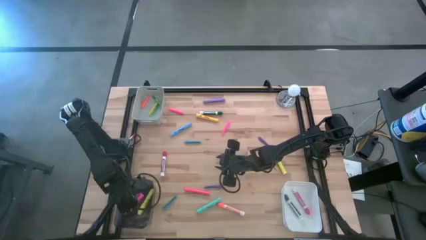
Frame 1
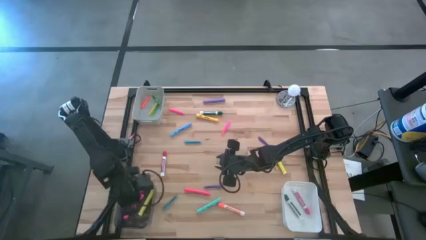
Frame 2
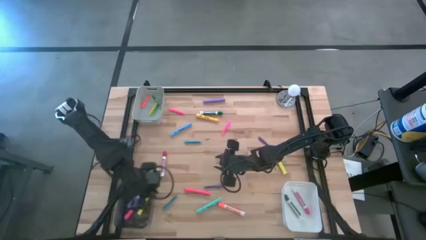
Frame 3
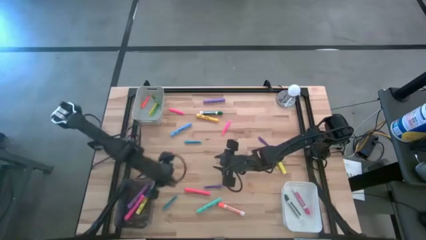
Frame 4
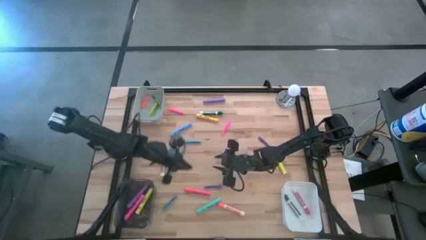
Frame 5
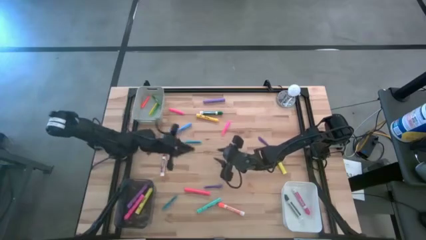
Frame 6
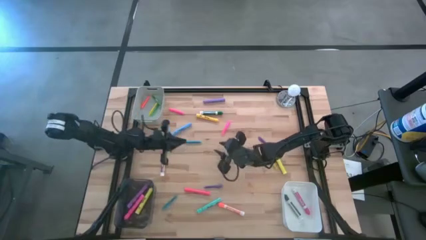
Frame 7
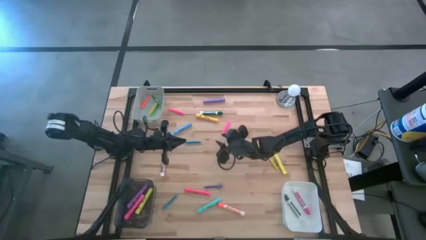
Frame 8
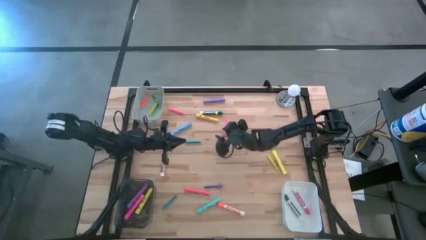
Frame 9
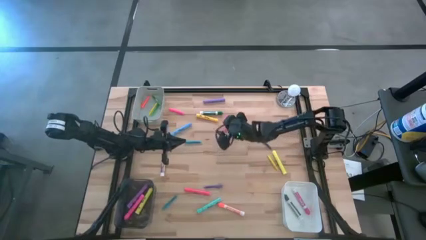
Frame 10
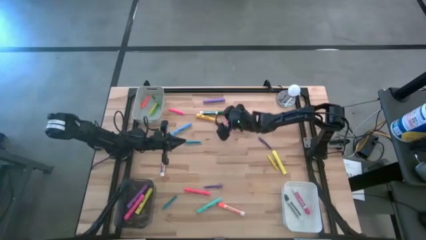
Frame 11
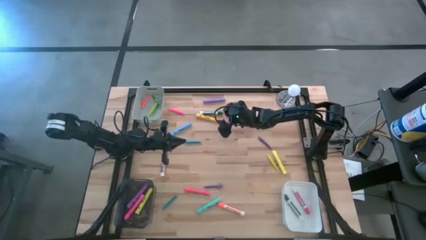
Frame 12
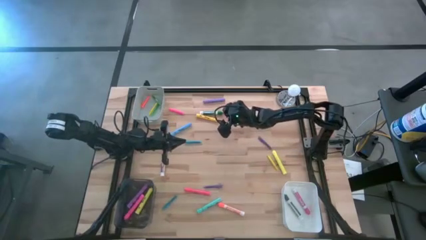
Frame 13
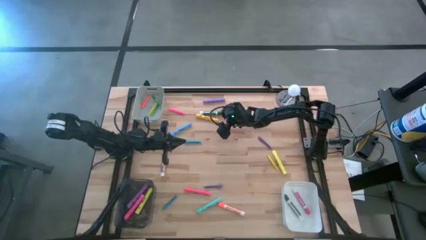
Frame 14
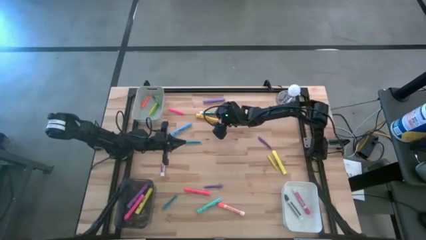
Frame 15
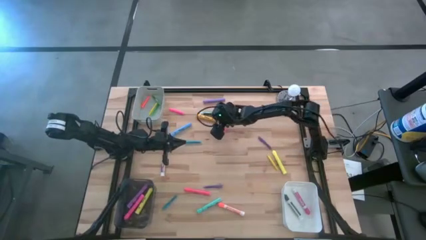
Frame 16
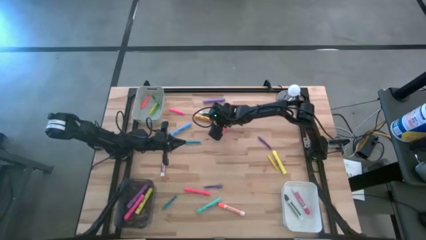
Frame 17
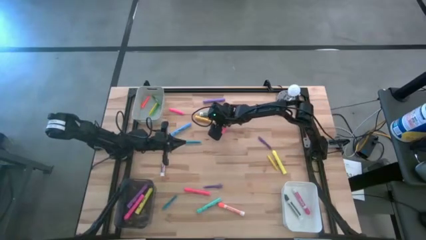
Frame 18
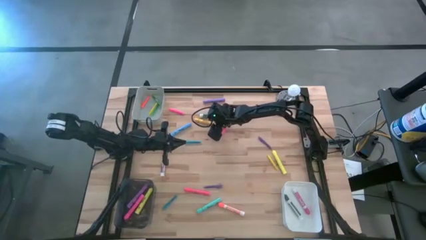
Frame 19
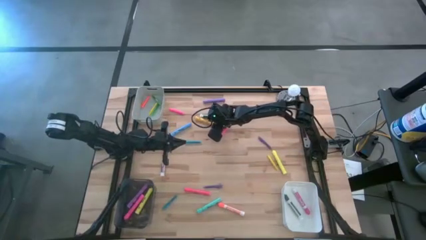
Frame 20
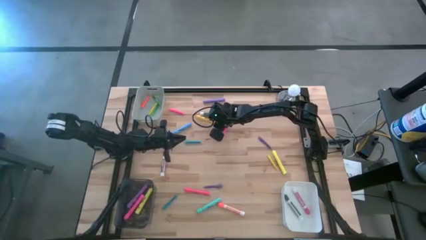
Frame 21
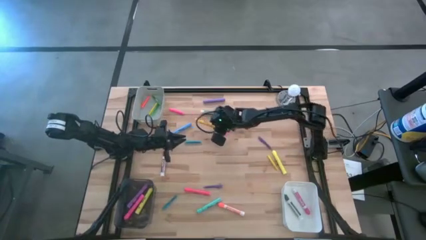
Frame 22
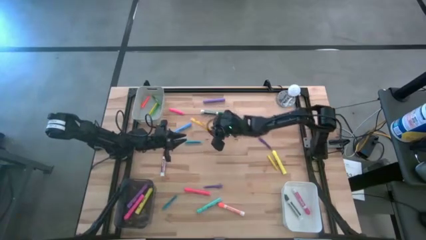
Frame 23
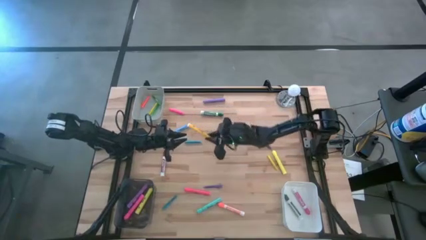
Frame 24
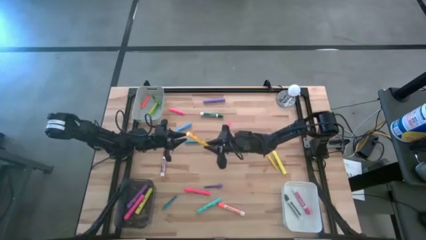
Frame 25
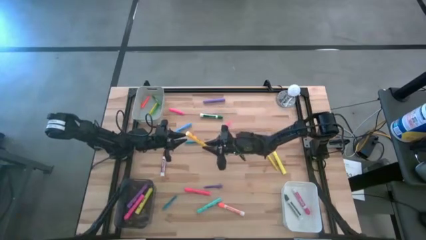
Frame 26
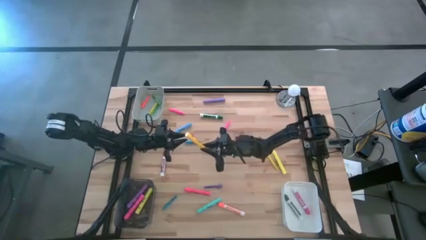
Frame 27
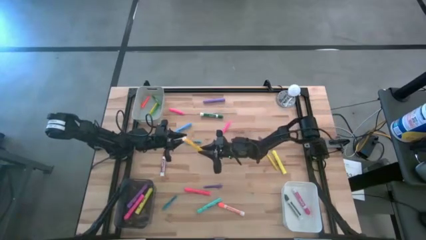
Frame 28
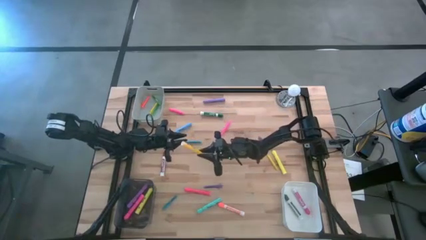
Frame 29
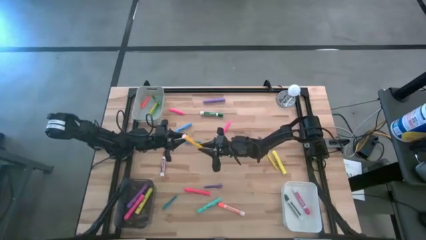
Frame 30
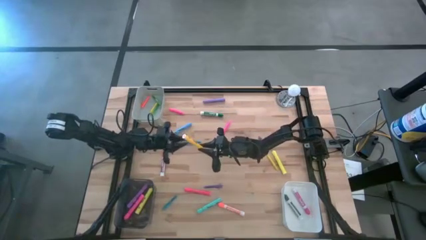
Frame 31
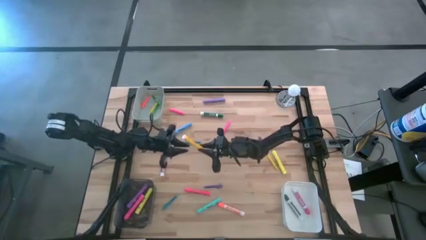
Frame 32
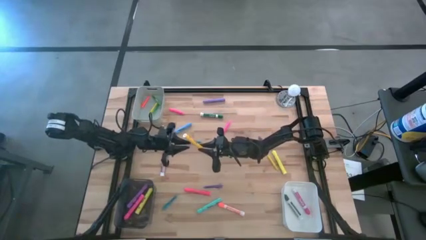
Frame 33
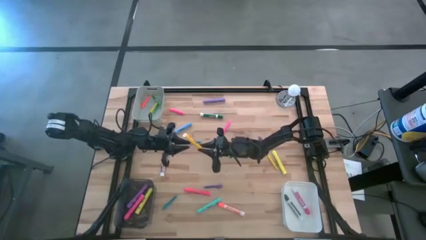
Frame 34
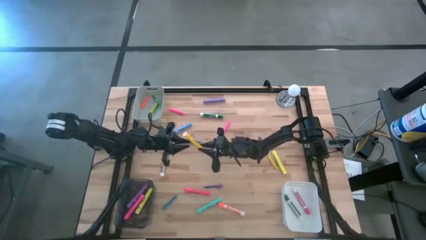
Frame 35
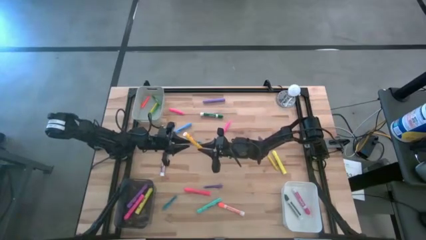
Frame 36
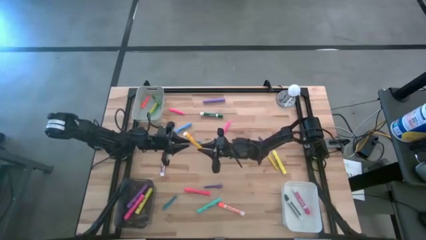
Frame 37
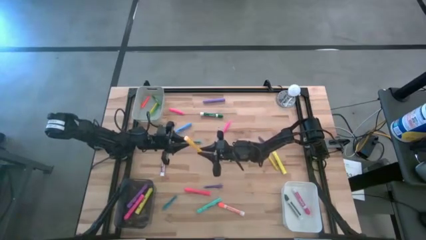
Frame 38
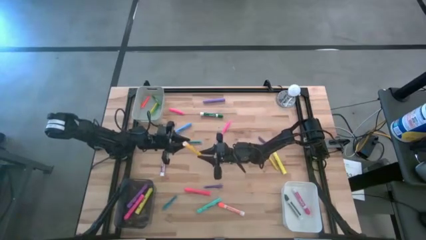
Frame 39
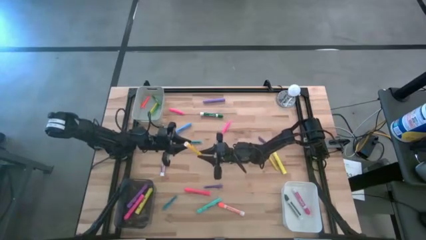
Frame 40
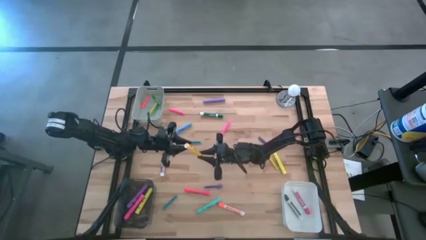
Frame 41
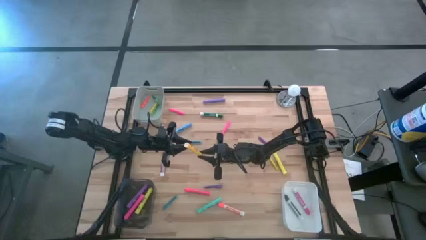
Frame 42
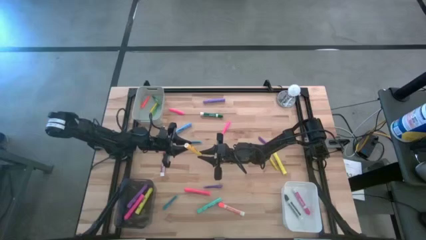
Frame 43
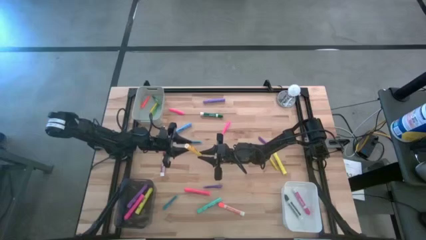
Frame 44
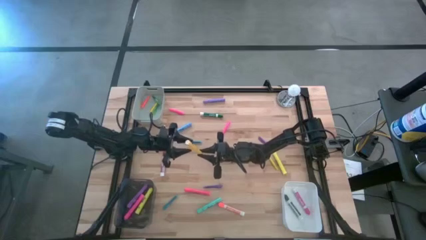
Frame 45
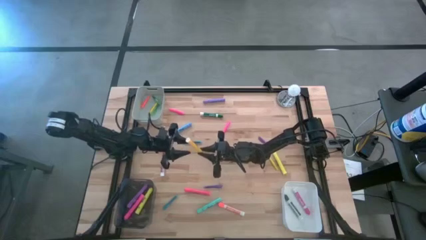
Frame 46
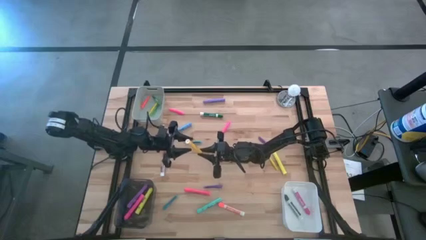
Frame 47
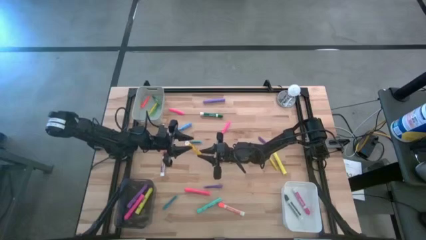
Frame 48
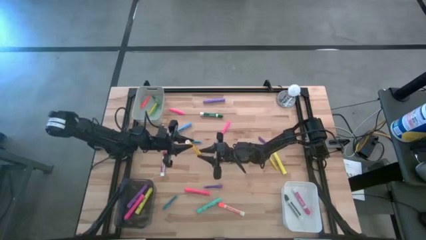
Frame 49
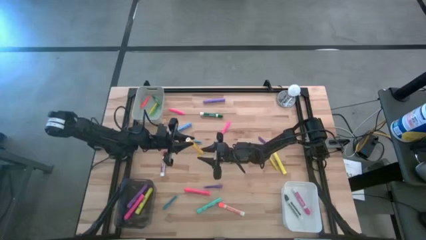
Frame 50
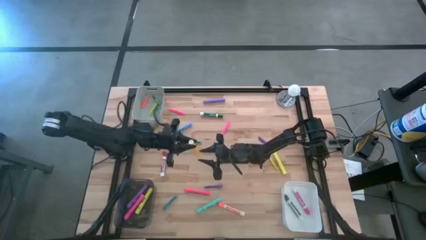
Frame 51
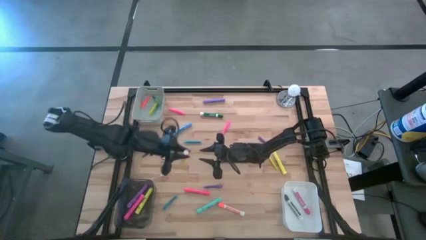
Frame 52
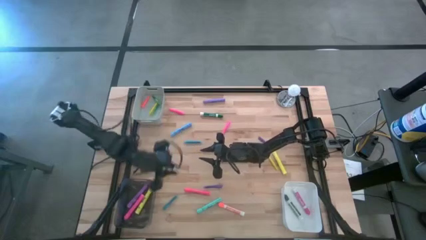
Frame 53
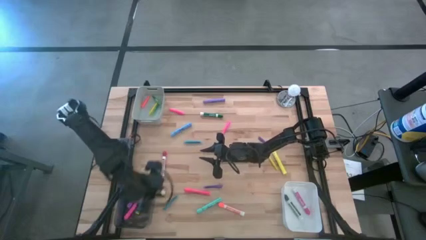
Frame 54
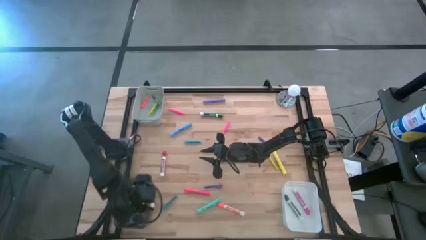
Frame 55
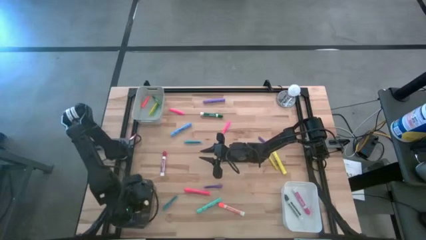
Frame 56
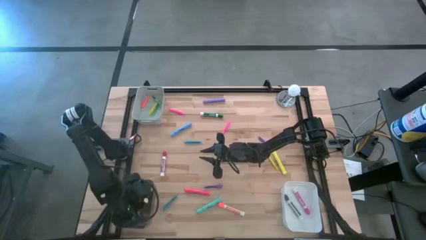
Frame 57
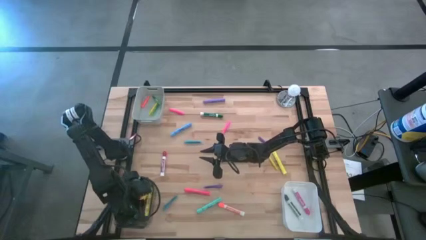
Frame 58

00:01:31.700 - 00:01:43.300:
Task: Pick & Place Markers
Put the yellow marker pen into the black bin

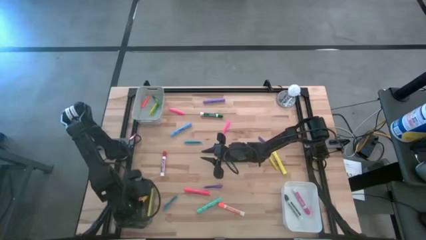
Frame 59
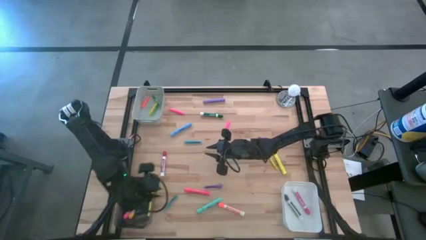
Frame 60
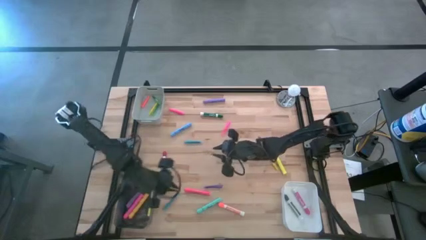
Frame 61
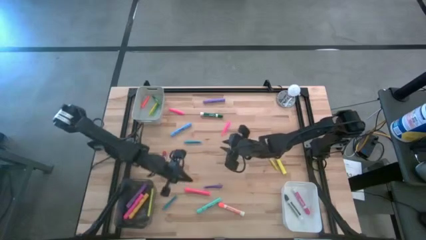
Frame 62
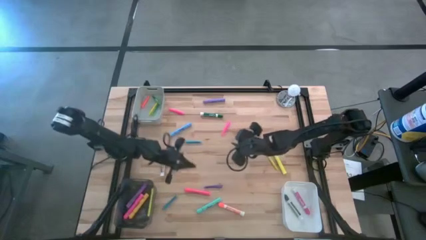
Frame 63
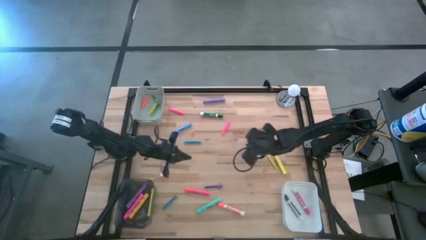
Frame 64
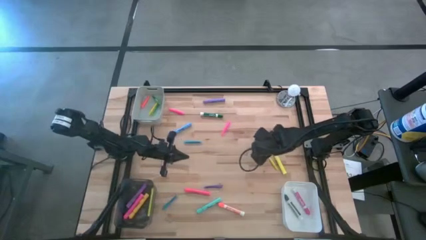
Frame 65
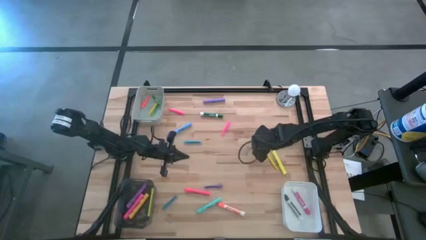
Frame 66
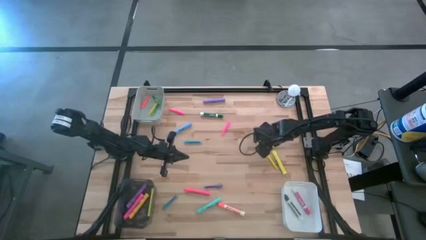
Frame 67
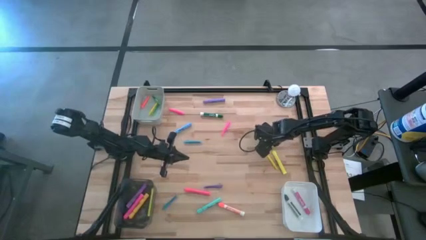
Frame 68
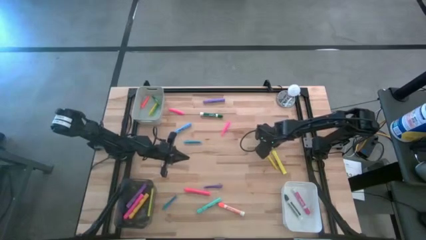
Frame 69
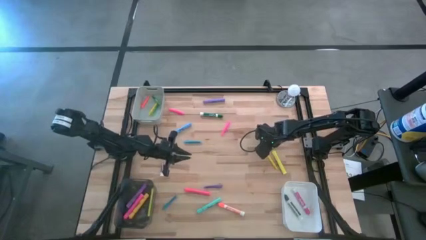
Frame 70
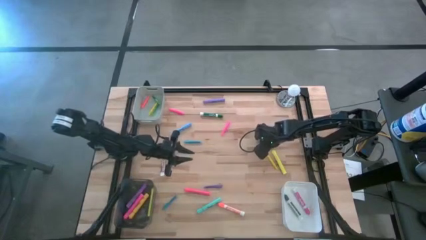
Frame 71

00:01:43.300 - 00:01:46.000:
Put the right violet pen into the gray bin

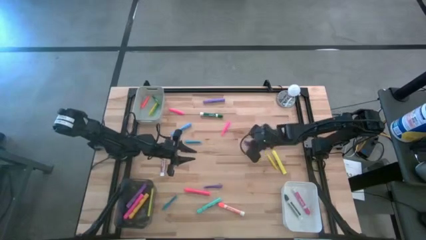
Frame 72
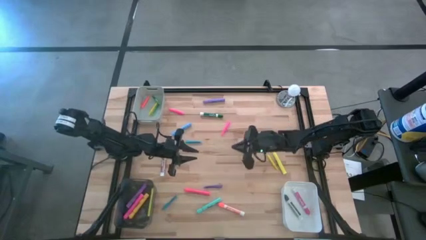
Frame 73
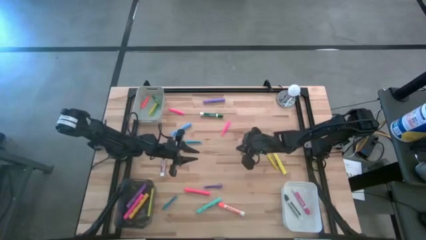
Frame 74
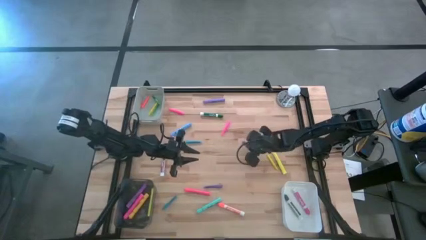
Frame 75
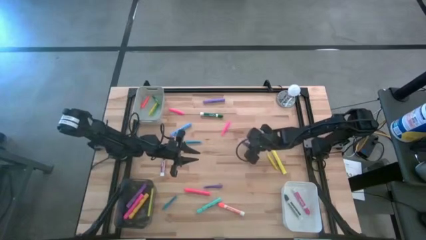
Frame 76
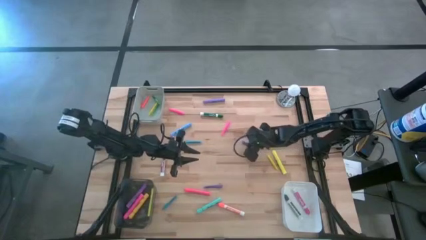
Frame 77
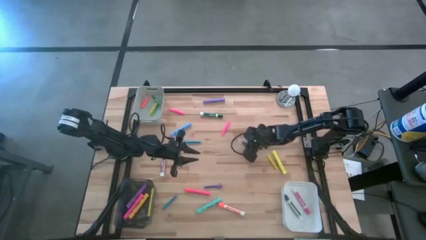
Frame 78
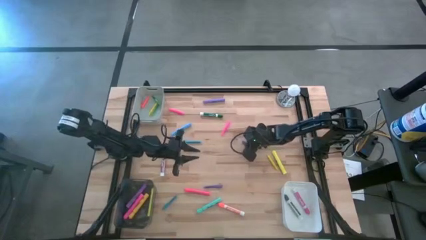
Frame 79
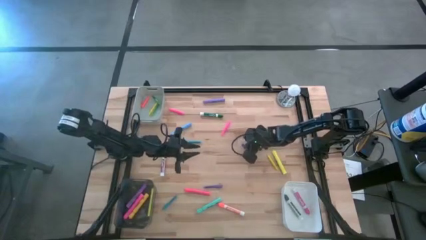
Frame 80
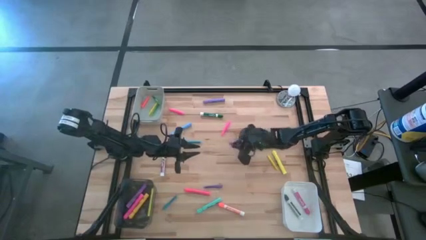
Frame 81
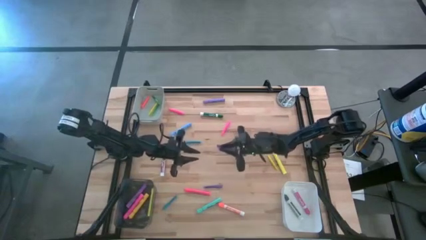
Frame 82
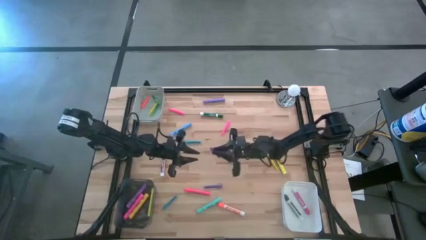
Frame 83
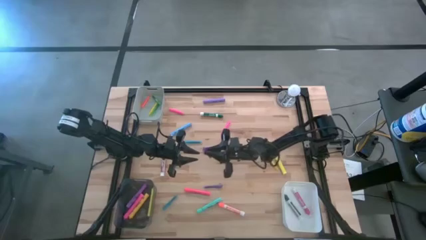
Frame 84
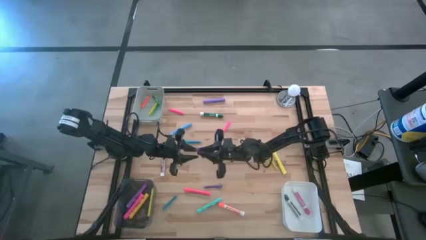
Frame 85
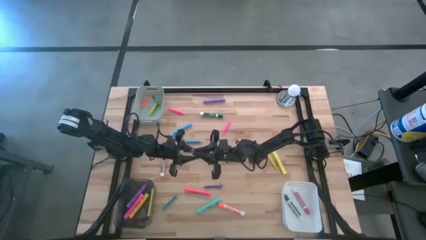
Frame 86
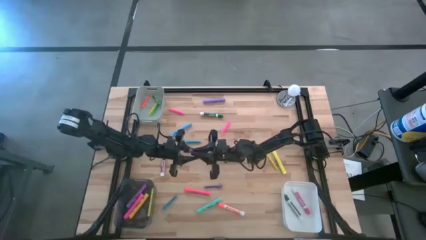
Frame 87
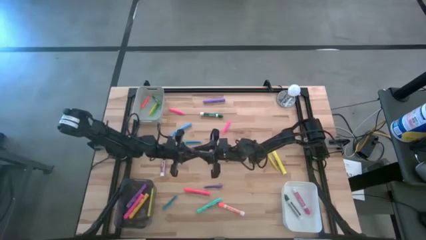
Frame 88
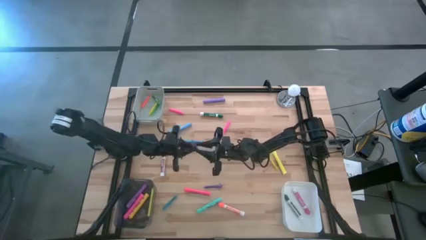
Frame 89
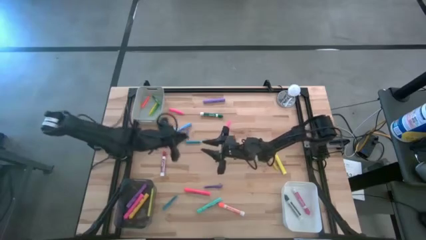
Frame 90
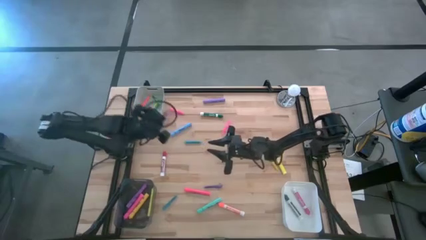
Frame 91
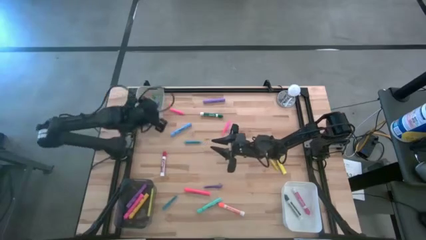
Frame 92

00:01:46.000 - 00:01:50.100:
Put the right violet pen into the gray bin
